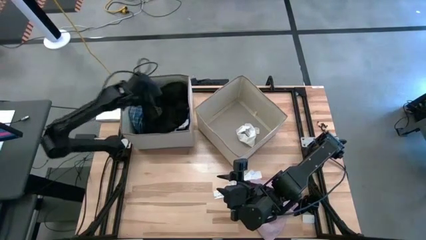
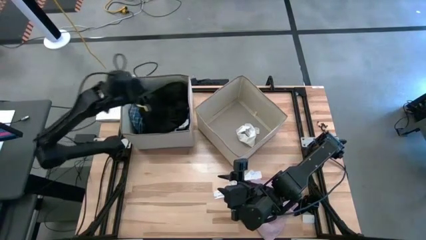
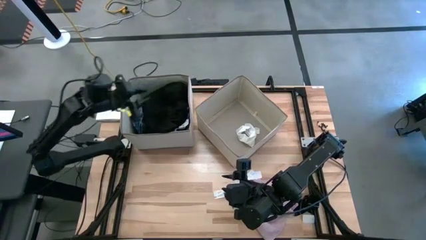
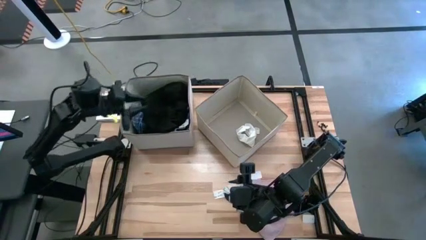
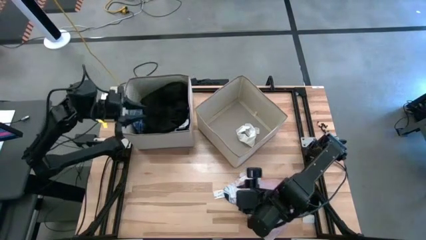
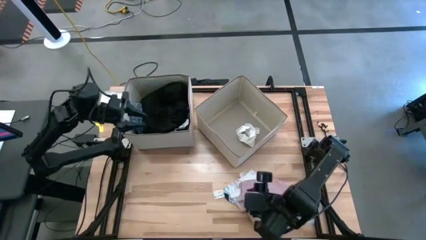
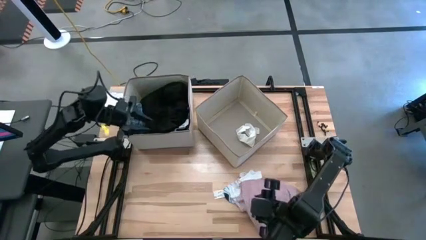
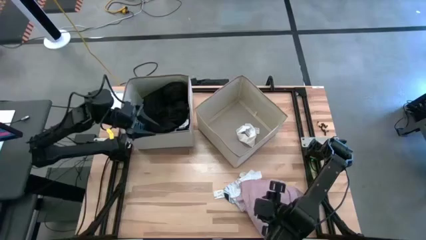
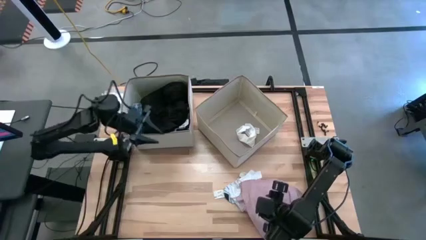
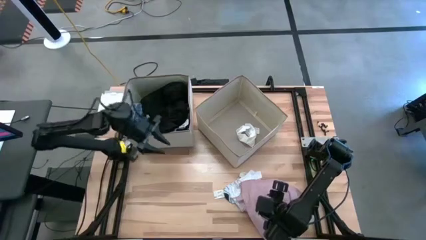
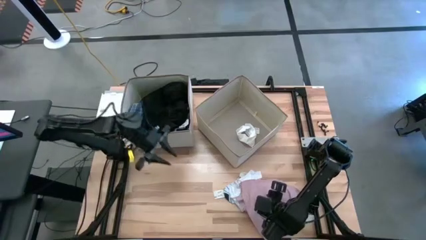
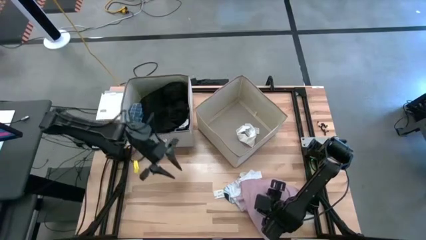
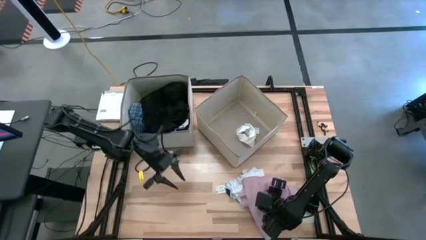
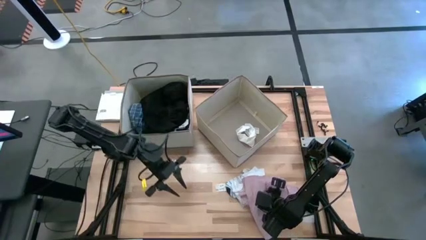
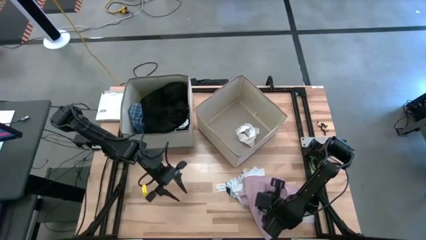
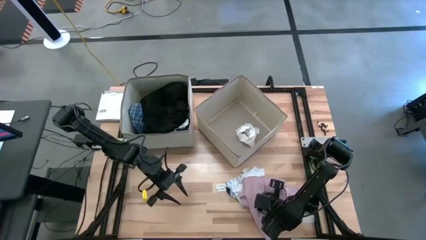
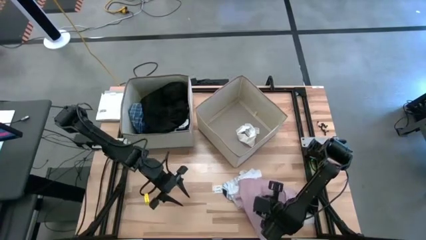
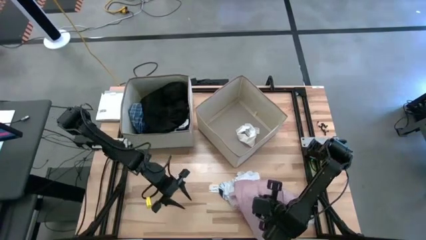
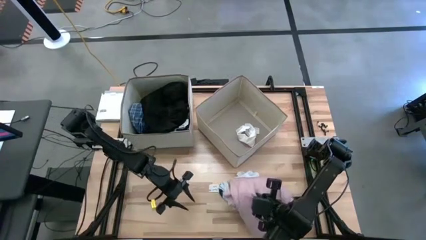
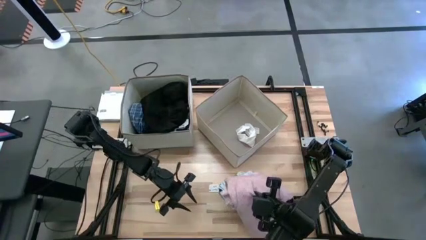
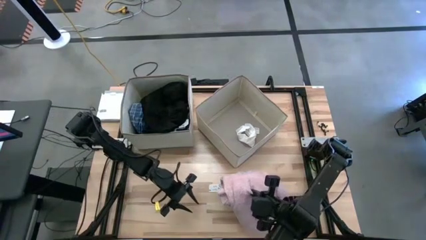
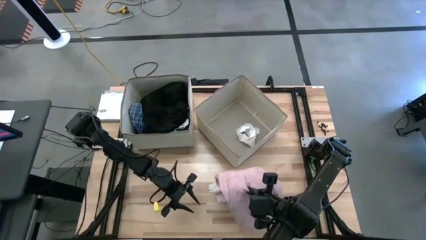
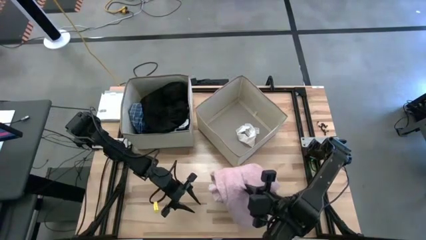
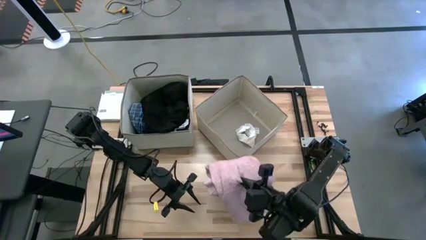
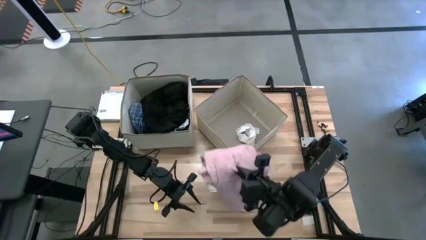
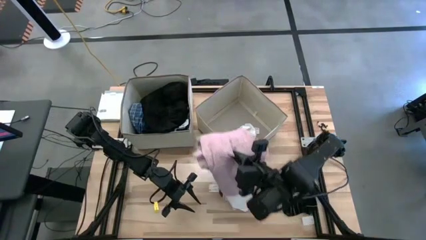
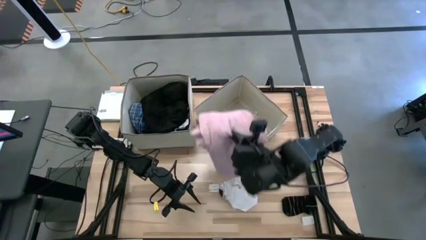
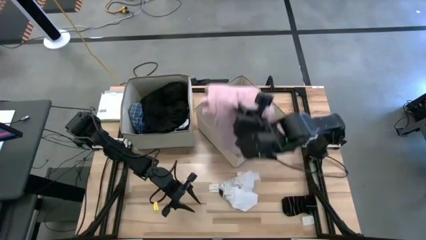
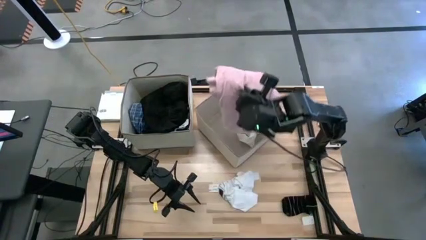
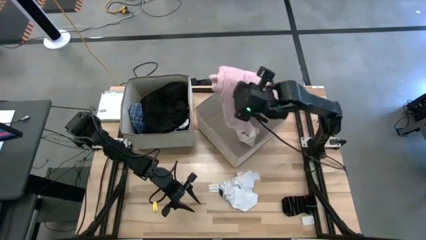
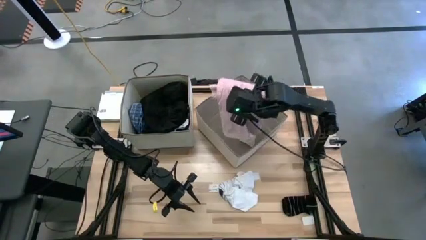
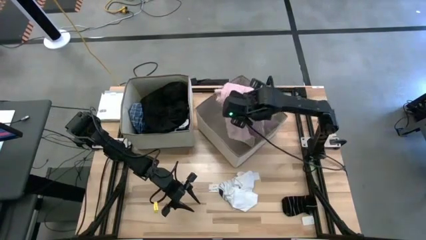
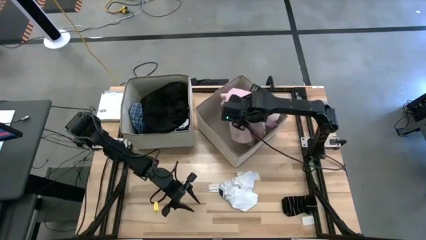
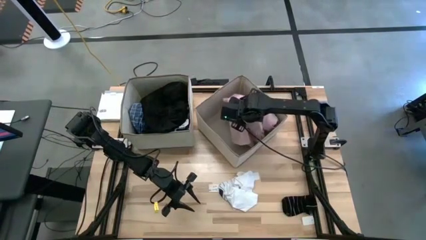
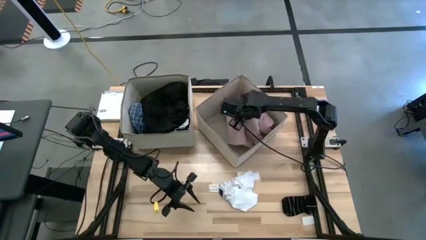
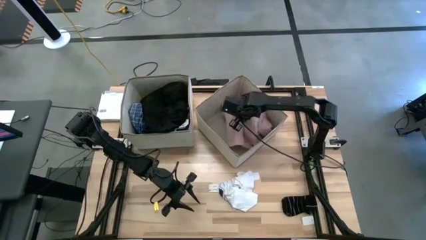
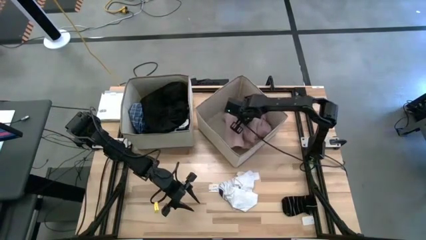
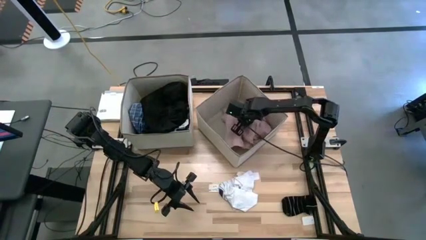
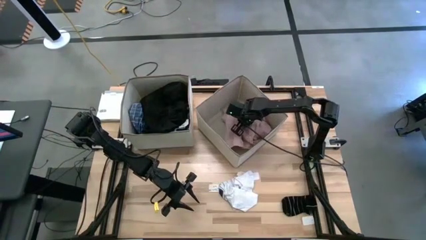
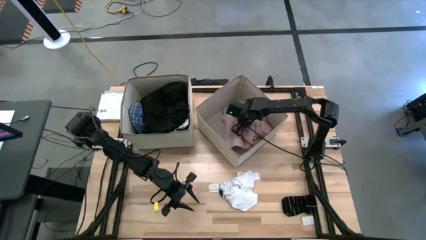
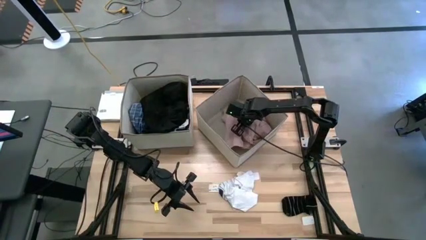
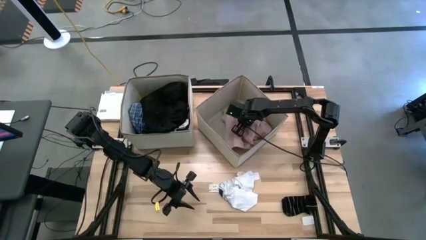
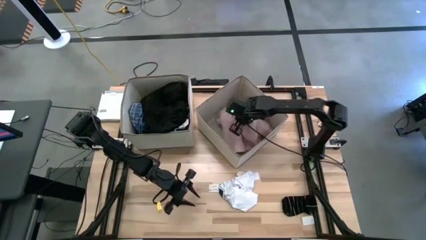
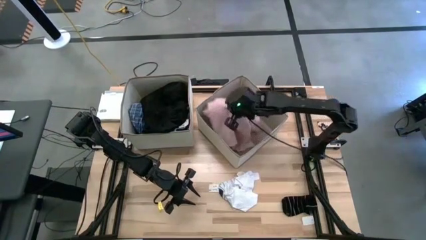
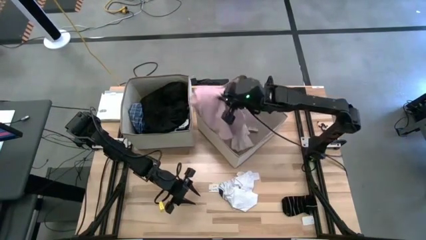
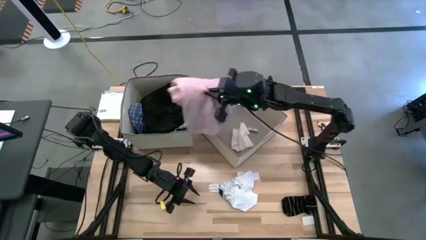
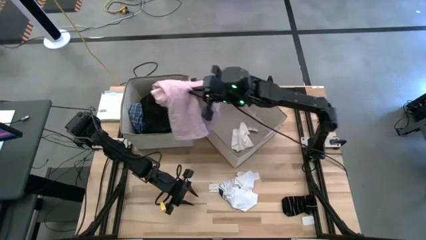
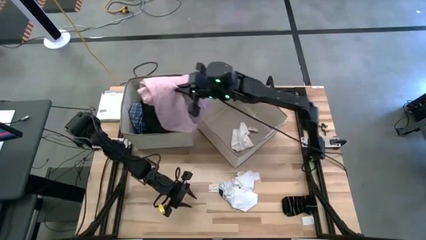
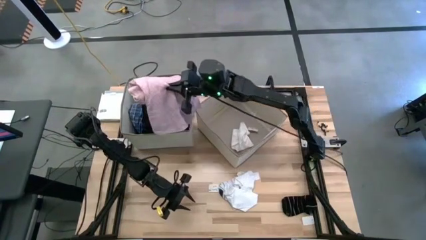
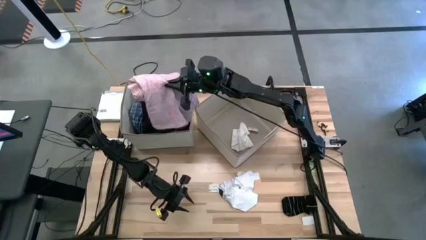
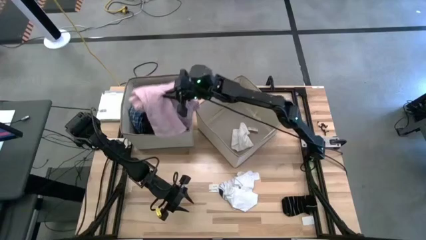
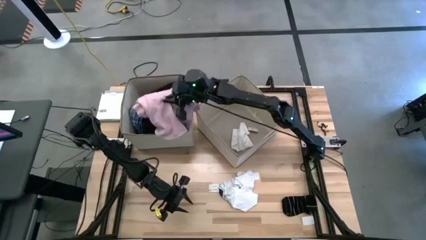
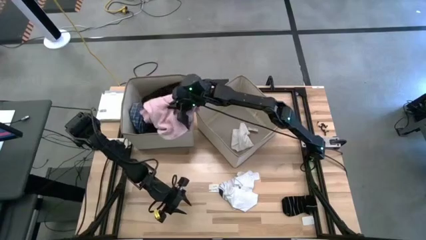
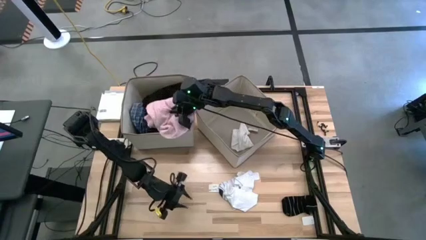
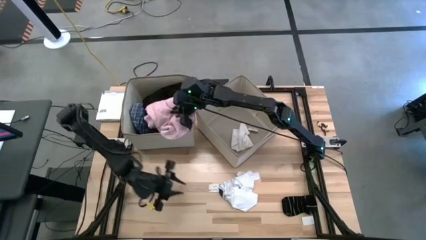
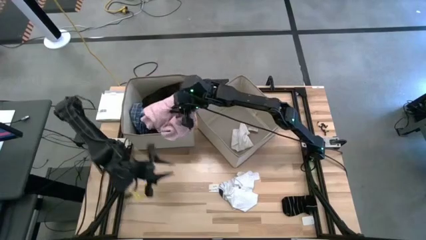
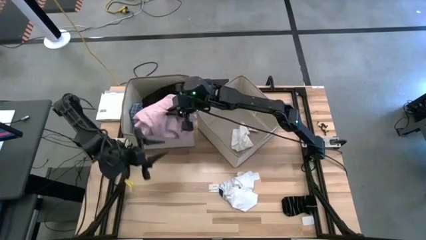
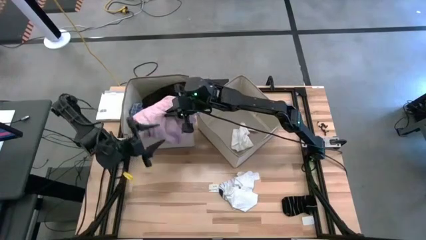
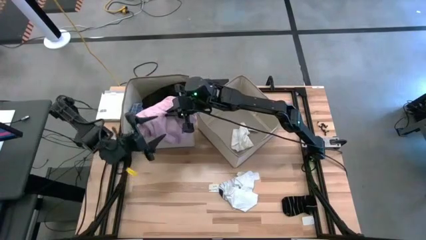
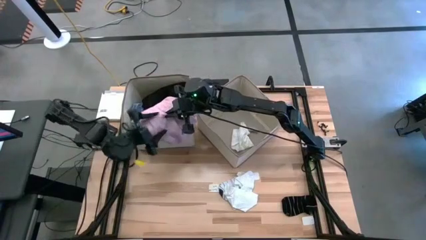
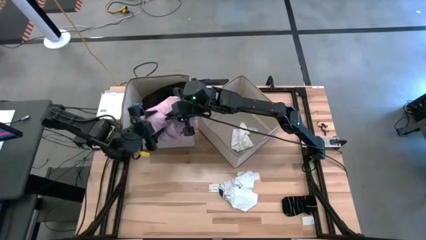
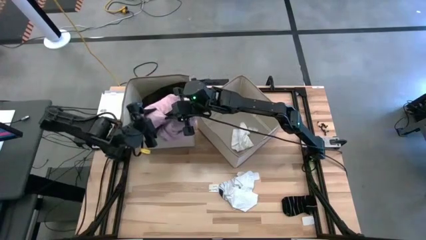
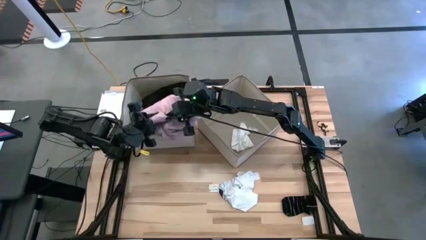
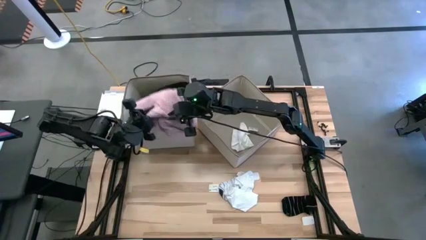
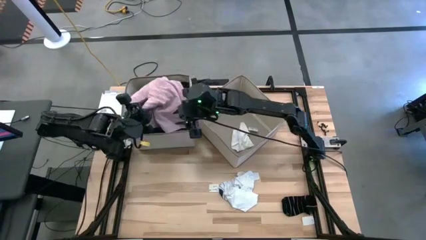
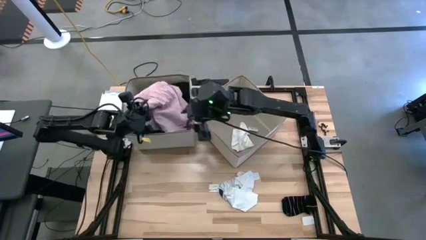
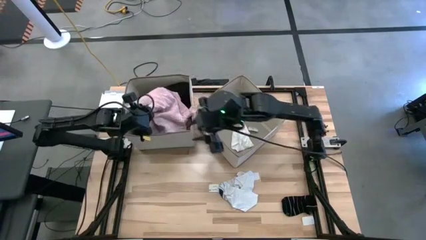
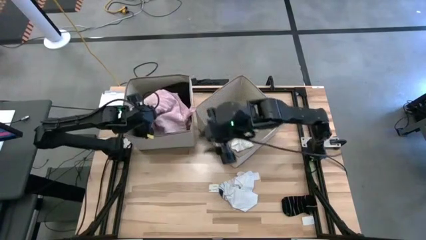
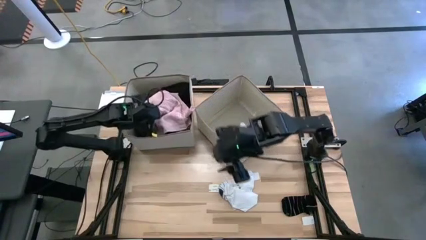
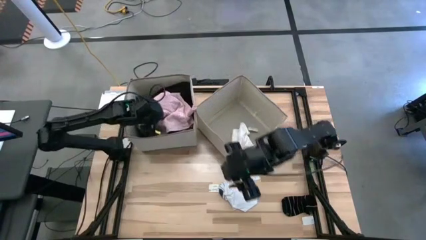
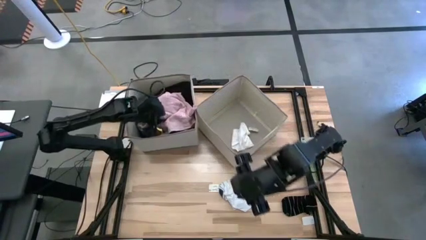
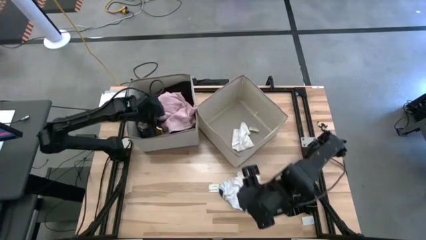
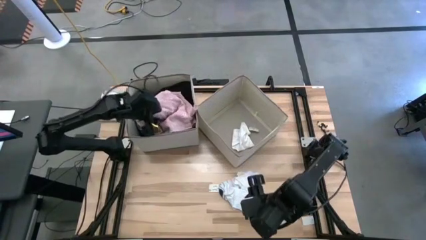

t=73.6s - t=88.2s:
Task: Sort clothes
Put the pink shirt into the left laundry organizer

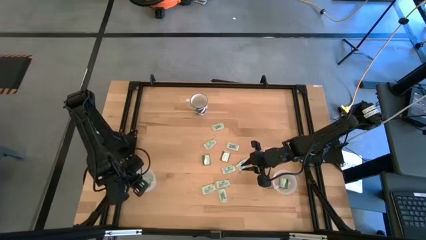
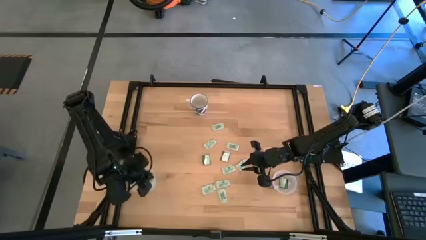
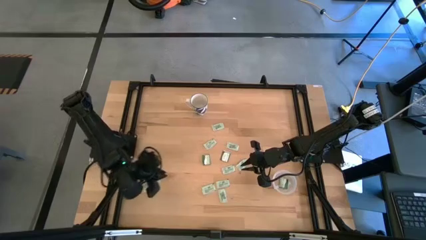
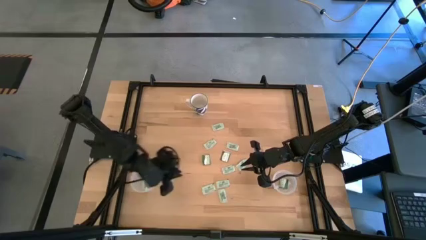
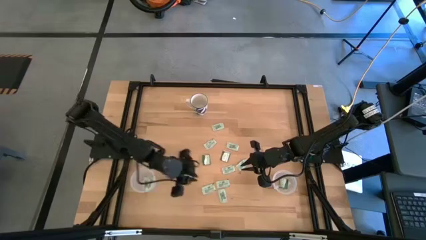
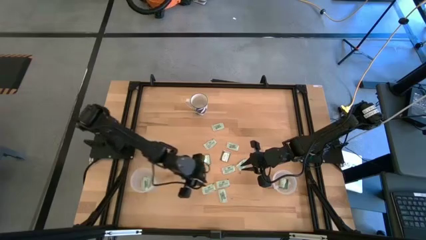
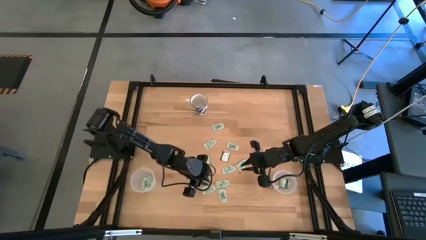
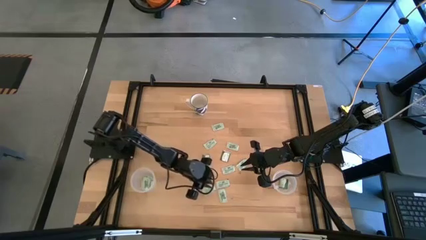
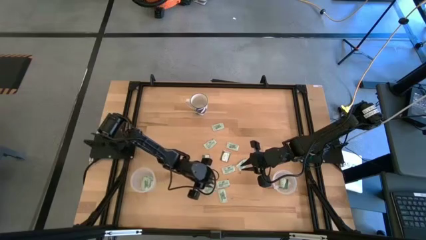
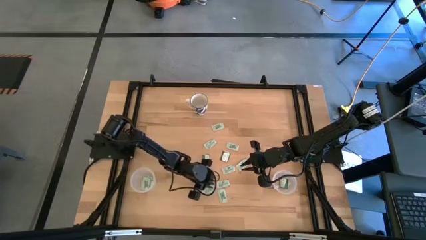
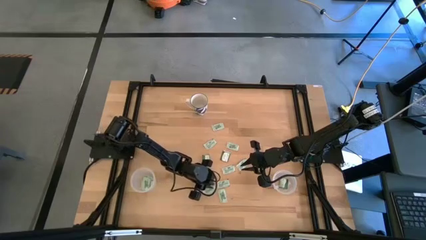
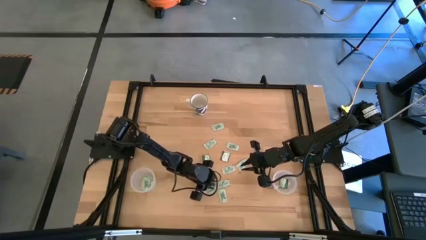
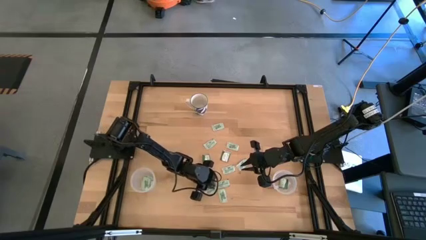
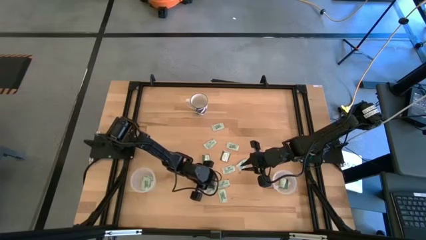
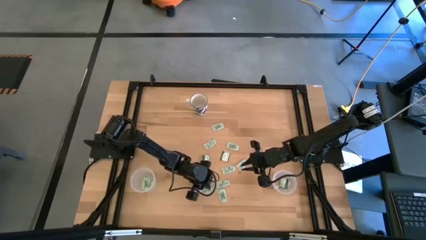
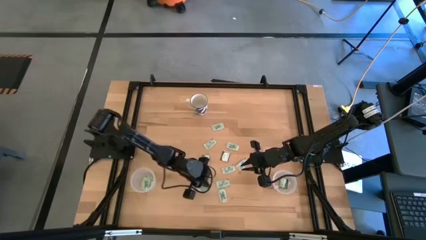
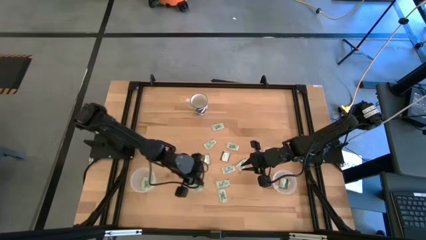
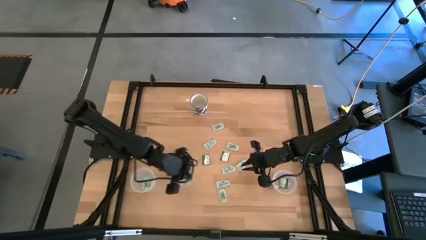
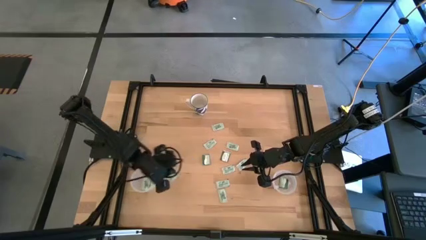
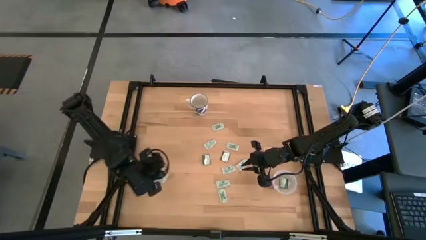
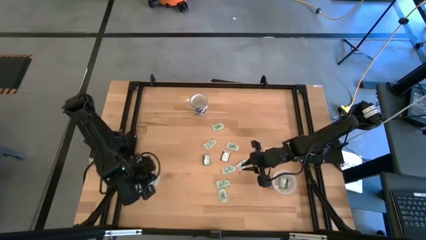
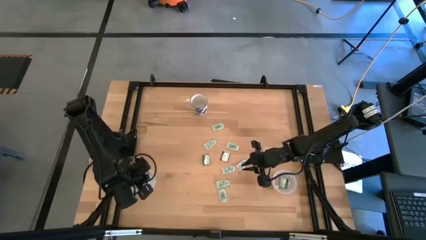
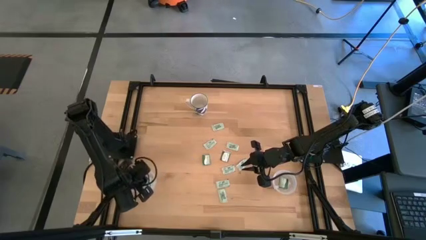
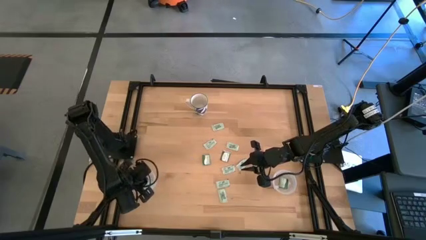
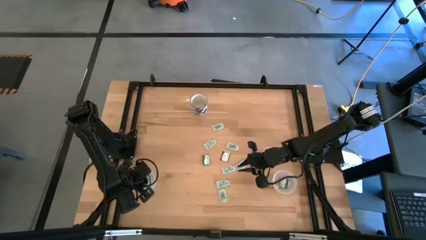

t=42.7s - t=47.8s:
Task: Pick and place Stevia / Truvia into bins
Put the light green stevia packet into the left transparent container
